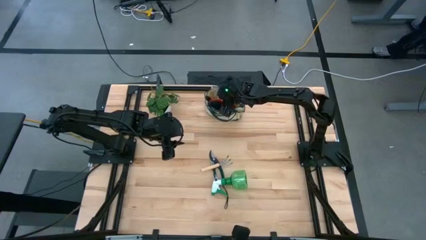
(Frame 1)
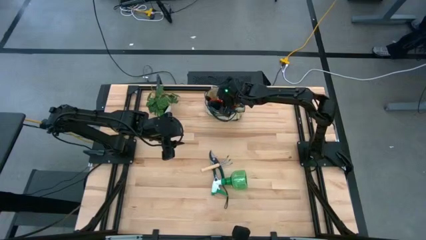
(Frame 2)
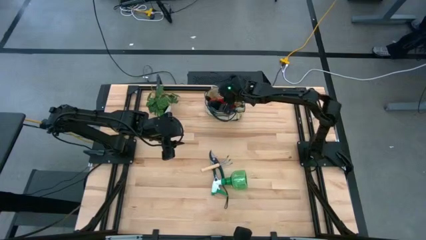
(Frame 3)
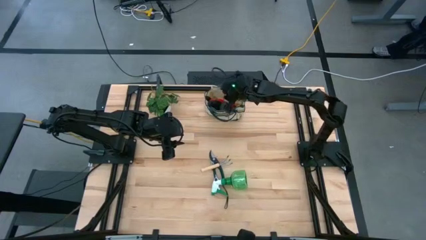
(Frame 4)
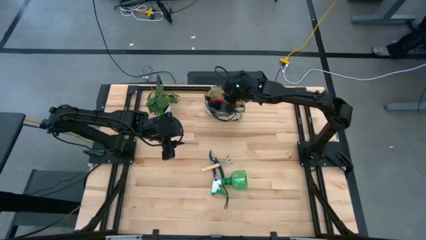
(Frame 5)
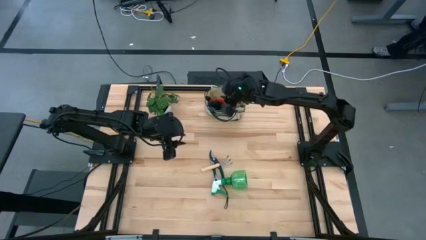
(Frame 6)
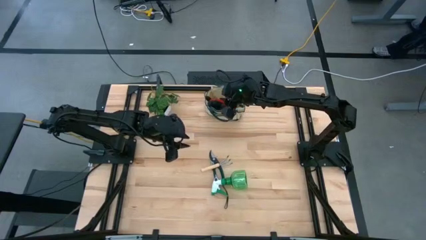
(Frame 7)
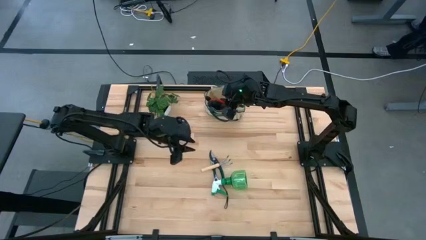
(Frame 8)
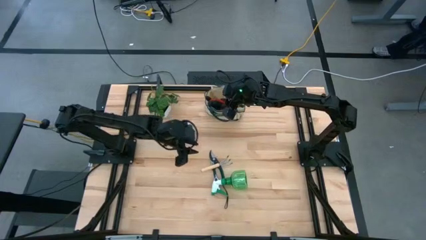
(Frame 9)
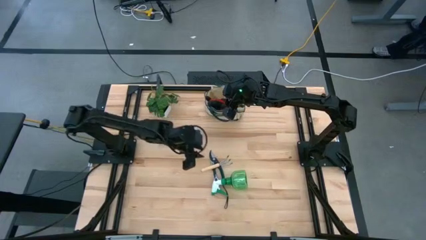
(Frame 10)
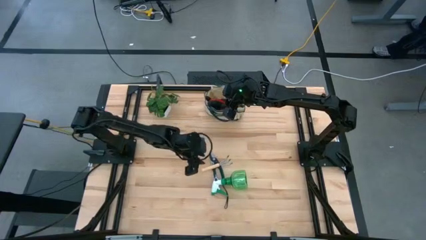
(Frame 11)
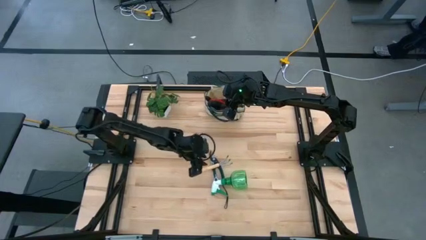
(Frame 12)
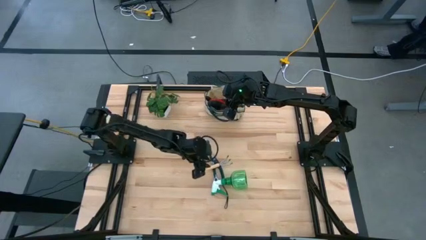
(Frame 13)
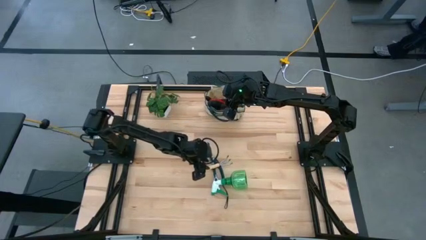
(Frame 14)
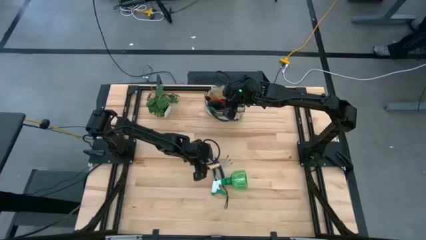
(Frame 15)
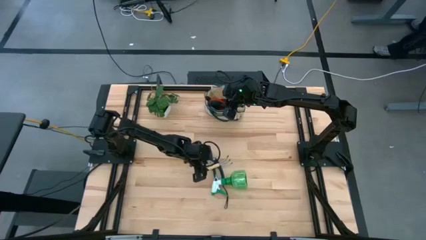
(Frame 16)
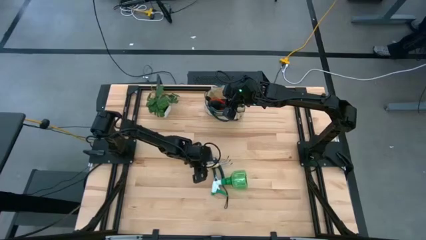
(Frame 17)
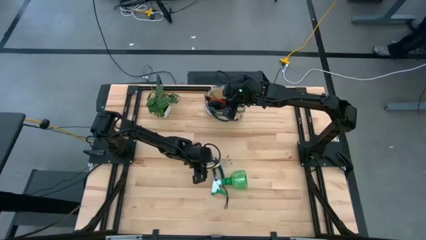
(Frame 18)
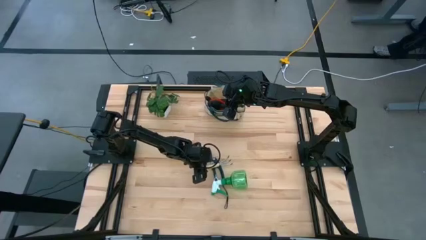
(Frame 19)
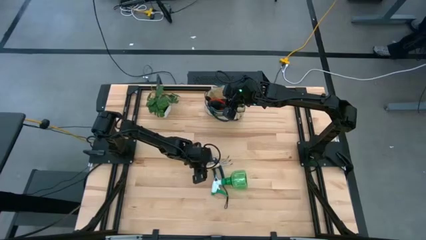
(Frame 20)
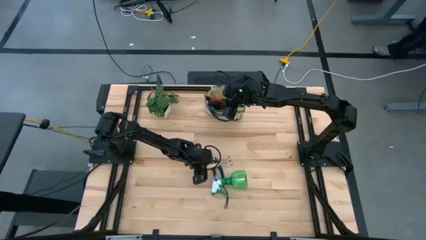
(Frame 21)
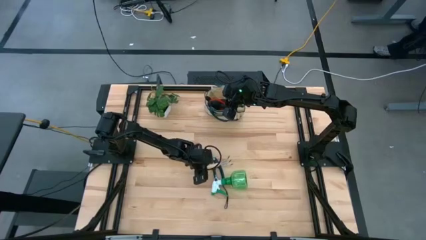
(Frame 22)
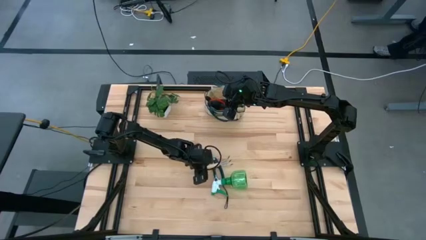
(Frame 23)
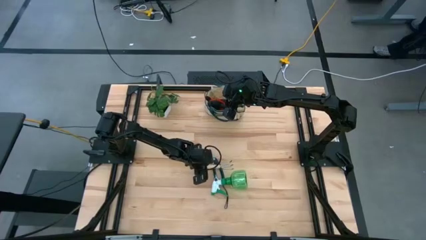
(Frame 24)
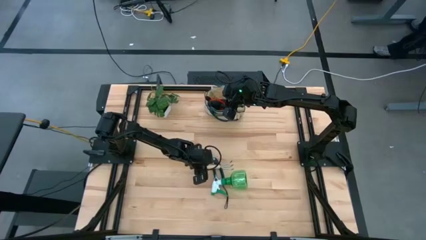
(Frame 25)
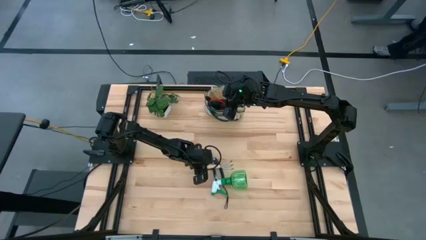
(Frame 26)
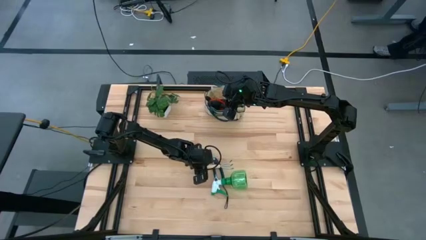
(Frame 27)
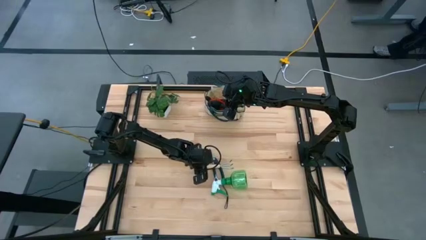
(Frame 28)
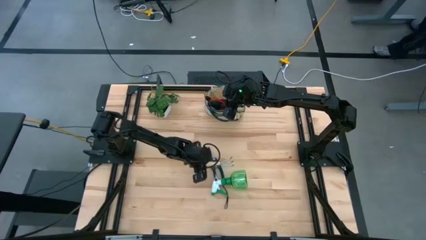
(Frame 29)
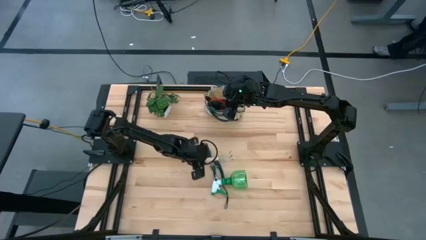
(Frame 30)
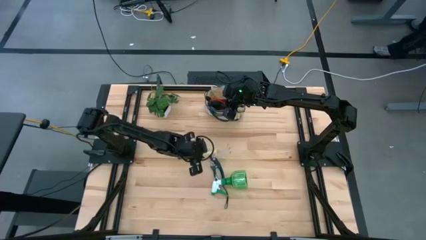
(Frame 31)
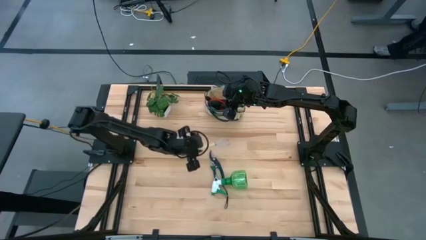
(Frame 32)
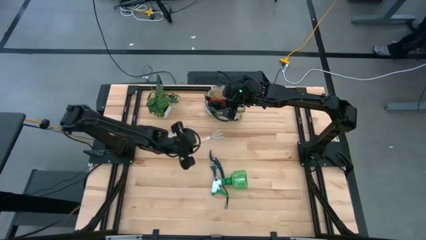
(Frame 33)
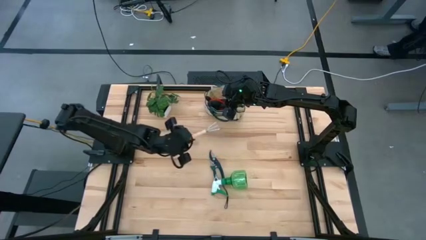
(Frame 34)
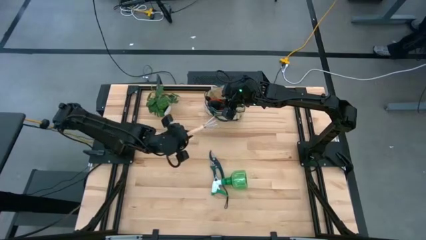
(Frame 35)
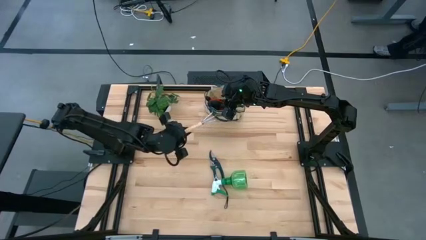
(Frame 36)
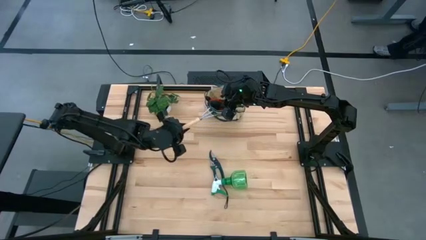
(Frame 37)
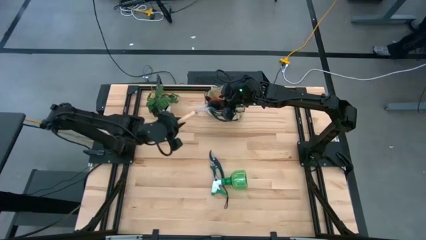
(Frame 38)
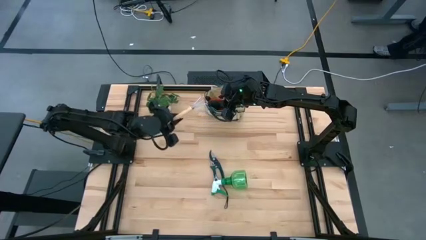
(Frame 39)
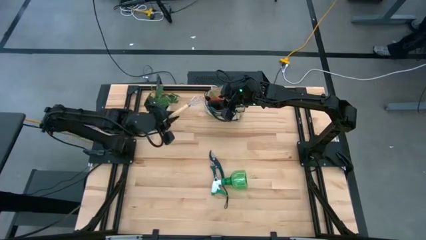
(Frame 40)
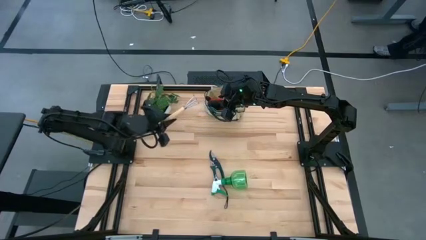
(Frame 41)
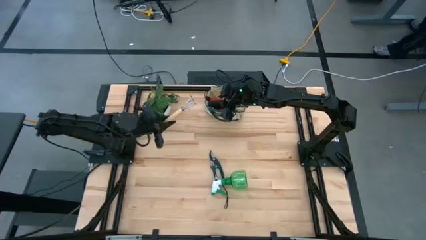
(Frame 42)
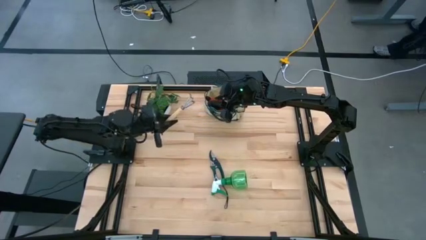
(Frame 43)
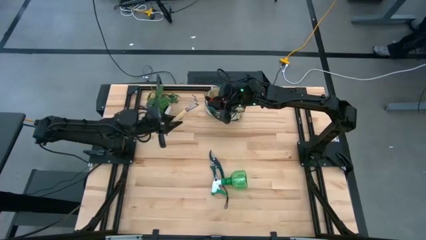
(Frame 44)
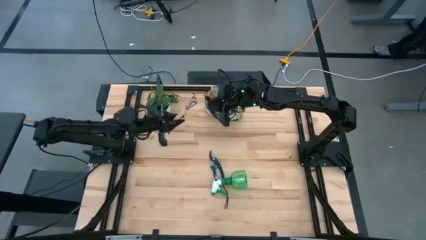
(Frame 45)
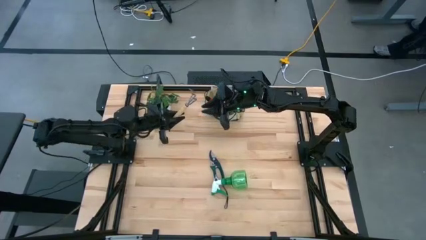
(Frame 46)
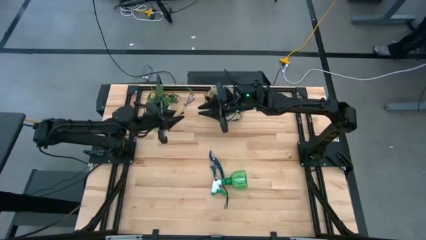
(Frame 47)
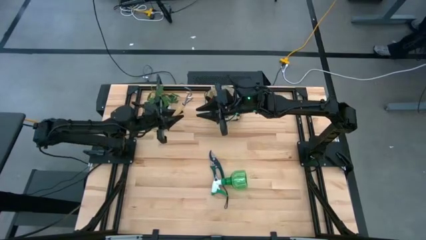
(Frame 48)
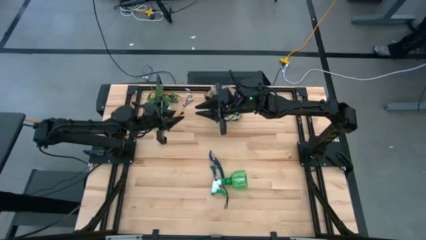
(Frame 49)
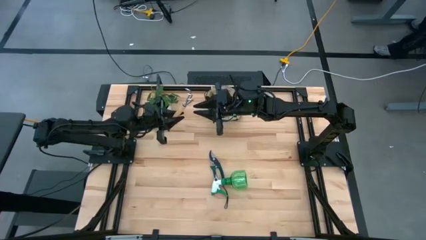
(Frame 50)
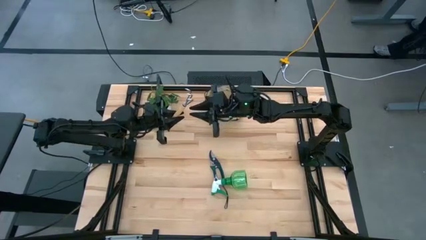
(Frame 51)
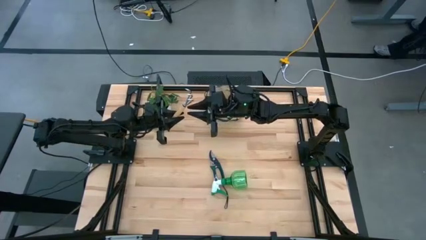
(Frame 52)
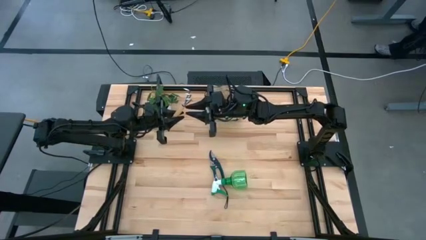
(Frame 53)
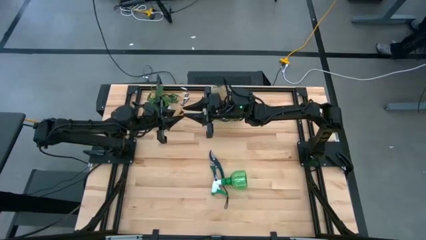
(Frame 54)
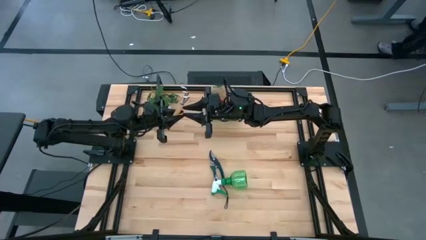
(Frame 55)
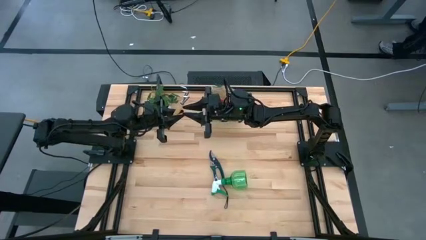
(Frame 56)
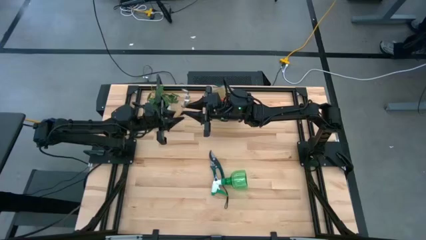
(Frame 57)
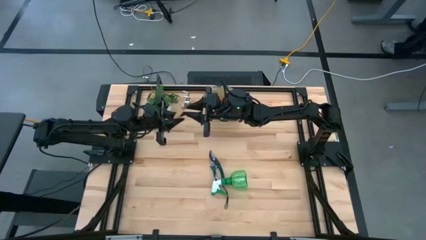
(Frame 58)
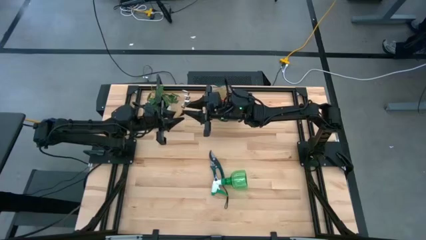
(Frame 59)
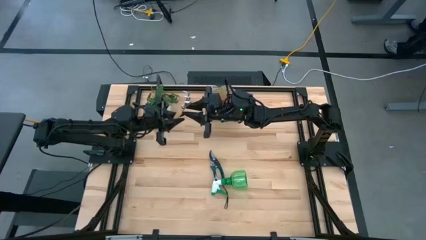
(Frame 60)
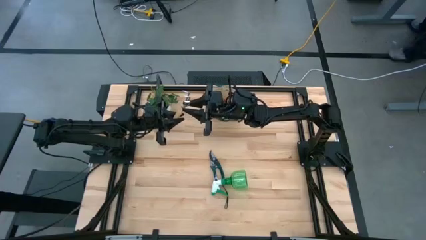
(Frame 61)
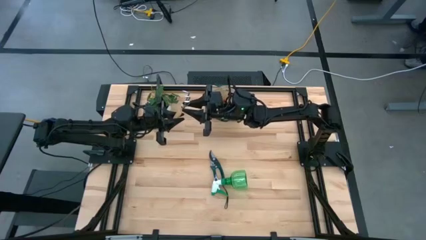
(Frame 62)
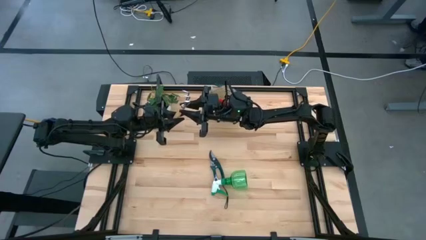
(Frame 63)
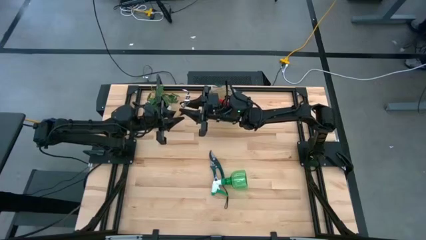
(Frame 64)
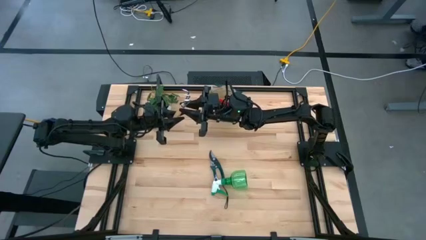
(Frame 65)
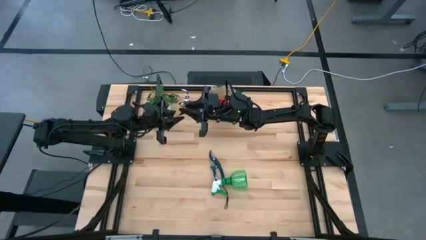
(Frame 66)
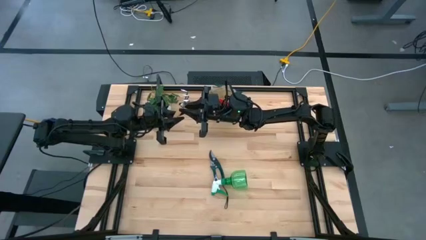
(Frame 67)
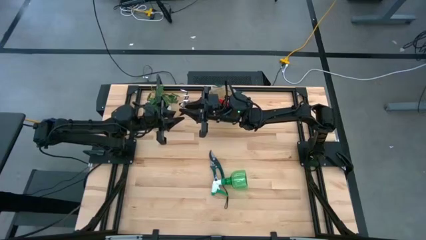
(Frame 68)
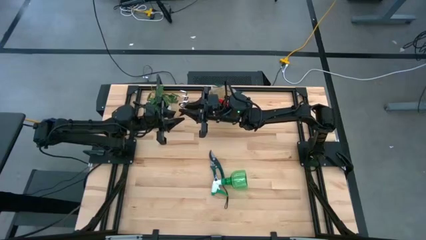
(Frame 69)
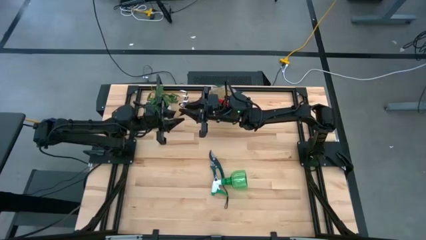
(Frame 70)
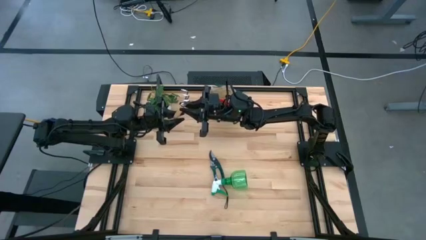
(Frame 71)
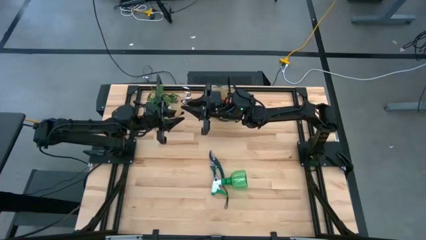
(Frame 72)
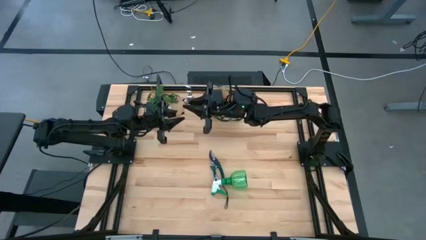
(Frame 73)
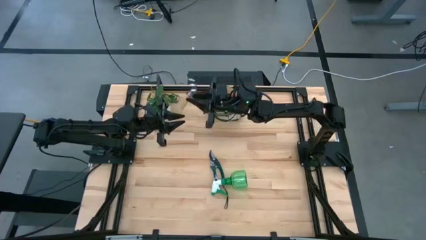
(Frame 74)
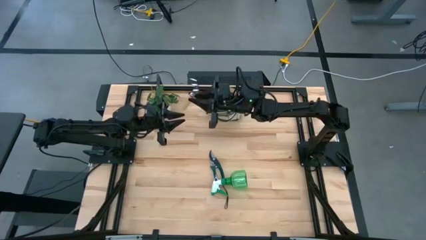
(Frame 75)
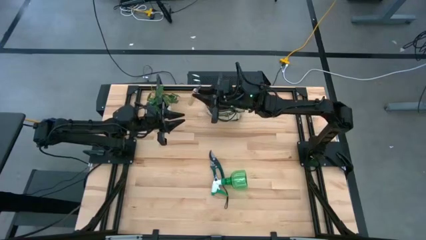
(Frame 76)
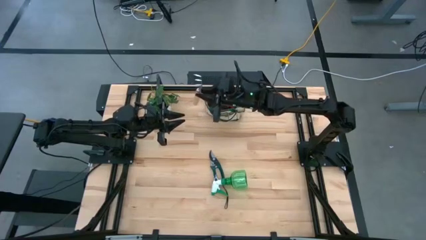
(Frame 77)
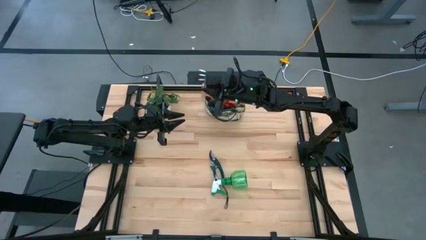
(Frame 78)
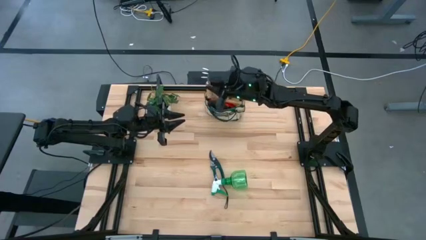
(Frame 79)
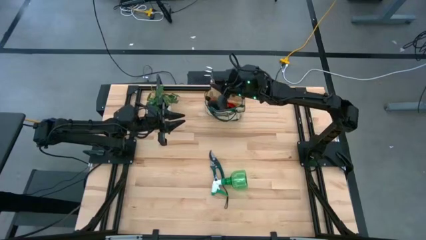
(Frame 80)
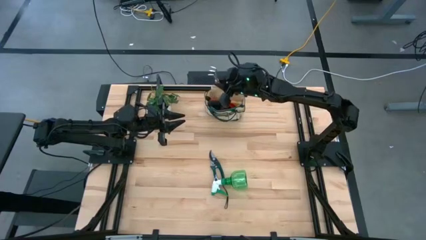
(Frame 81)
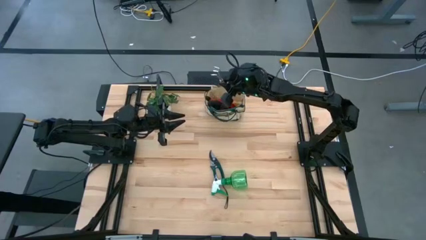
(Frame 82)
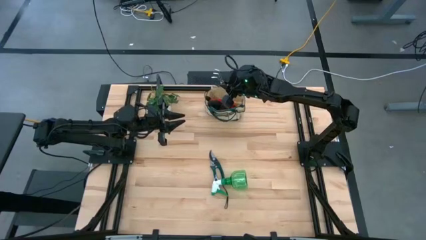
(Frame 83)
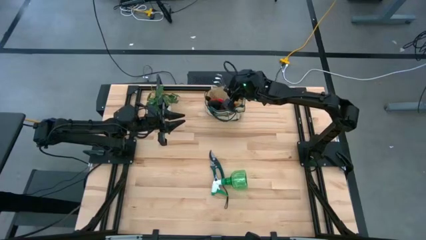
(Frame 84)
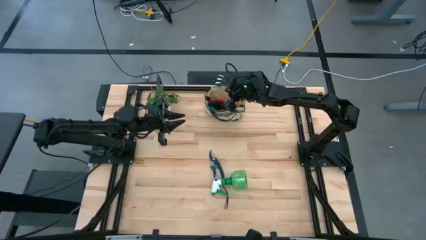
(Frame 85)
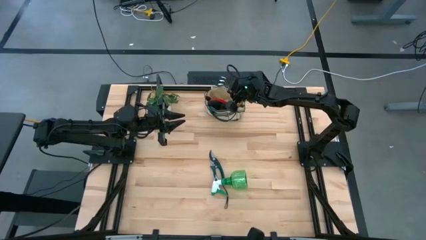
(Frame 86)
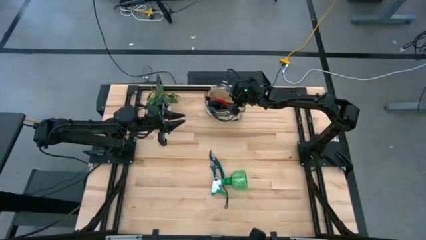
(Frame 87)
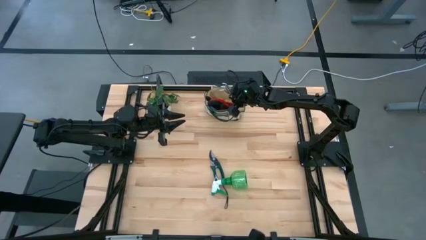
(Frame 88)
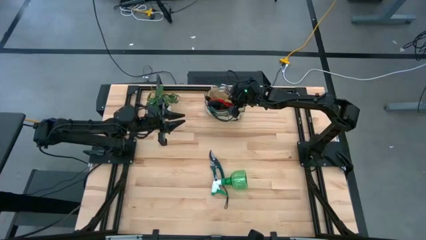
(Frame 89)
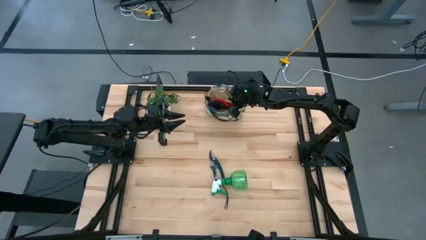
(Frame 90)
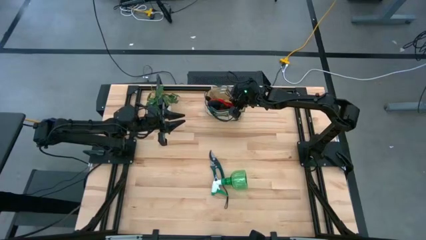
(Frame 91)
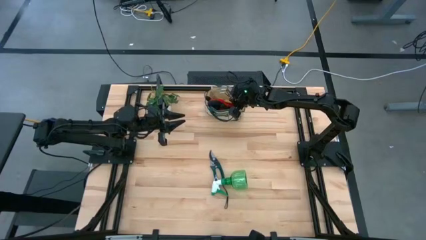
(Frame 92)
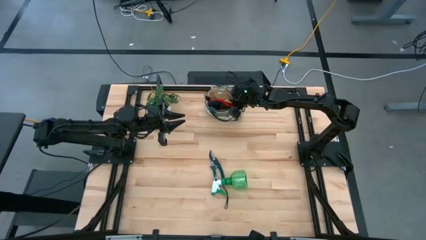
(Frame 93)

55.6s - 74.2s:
Task: Pick & Place Garden tools in Gardening bag
Put the brown hand rake into the gardening bag
